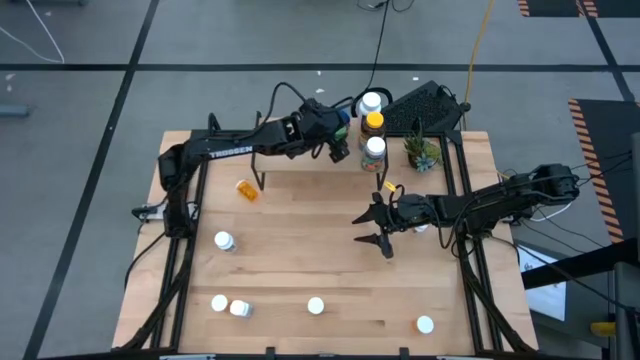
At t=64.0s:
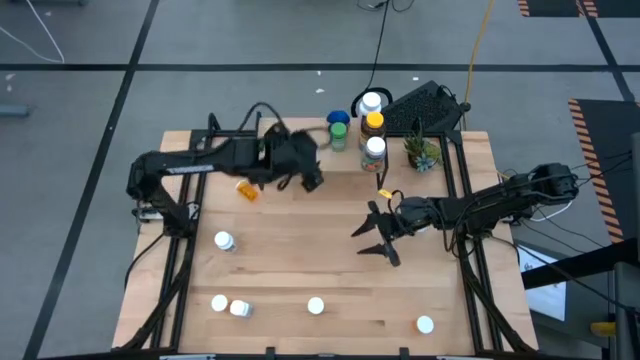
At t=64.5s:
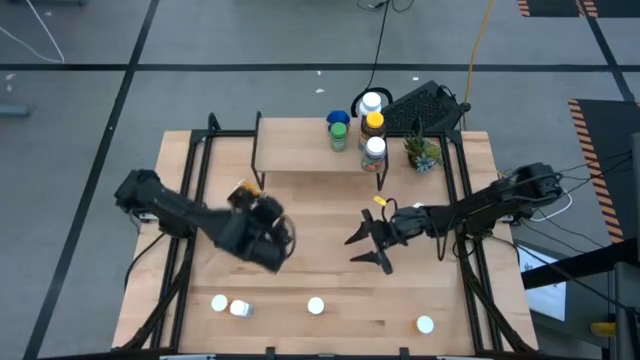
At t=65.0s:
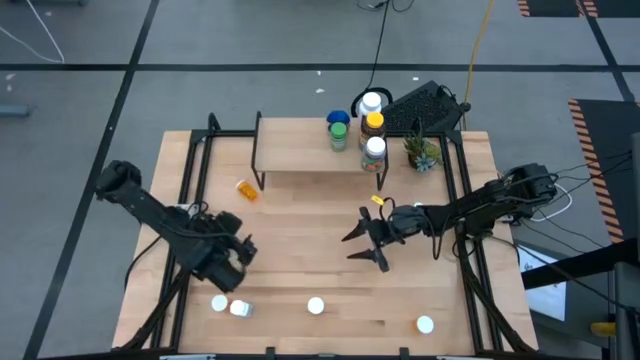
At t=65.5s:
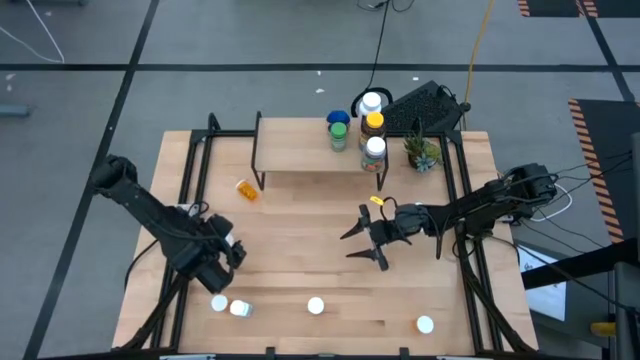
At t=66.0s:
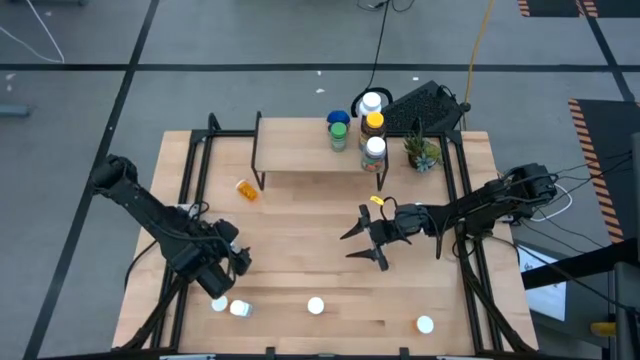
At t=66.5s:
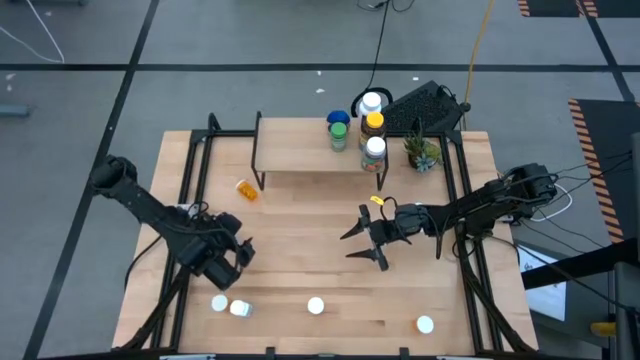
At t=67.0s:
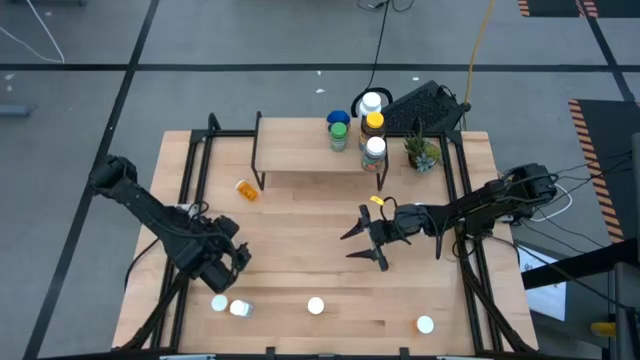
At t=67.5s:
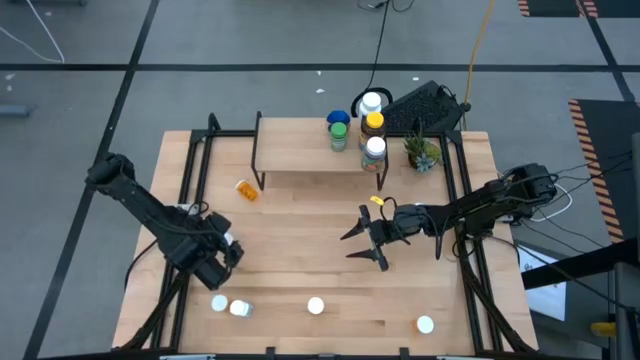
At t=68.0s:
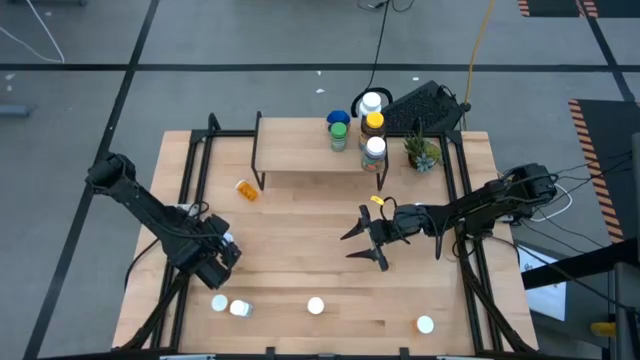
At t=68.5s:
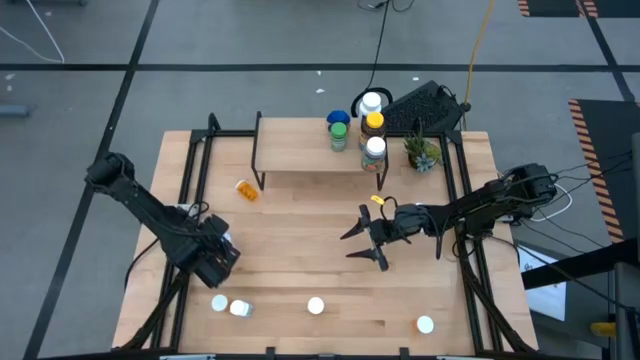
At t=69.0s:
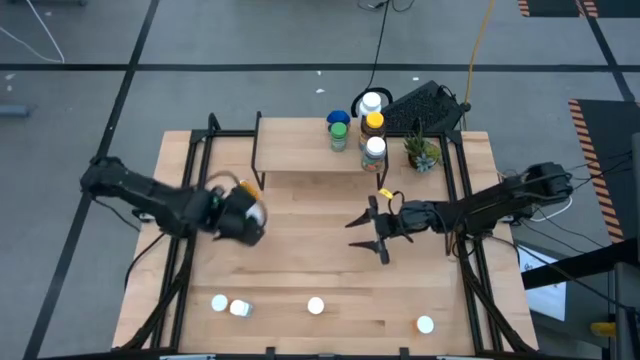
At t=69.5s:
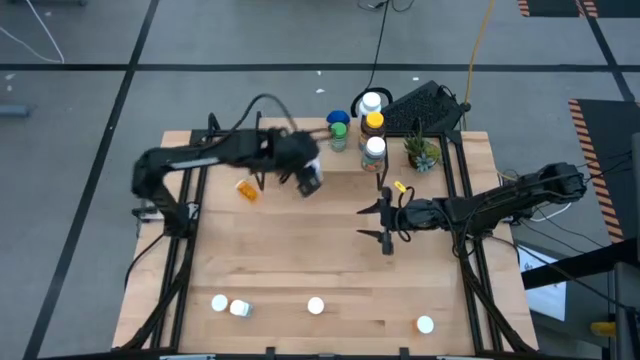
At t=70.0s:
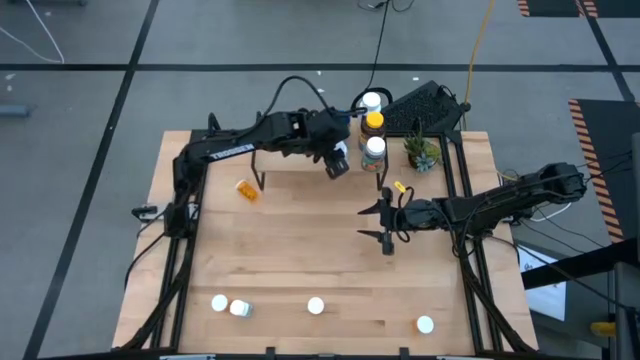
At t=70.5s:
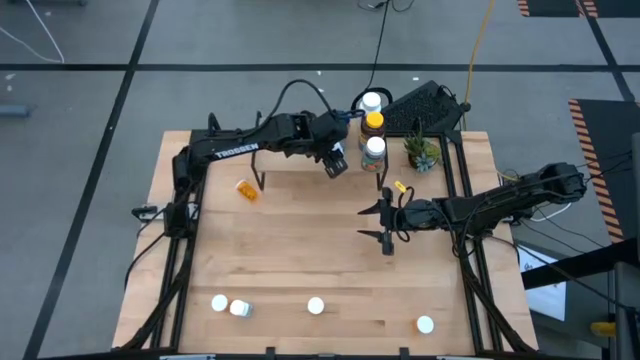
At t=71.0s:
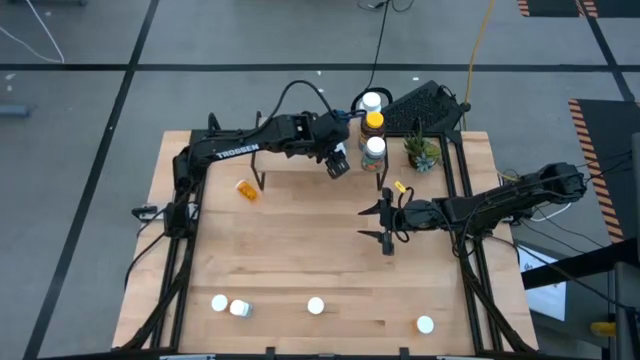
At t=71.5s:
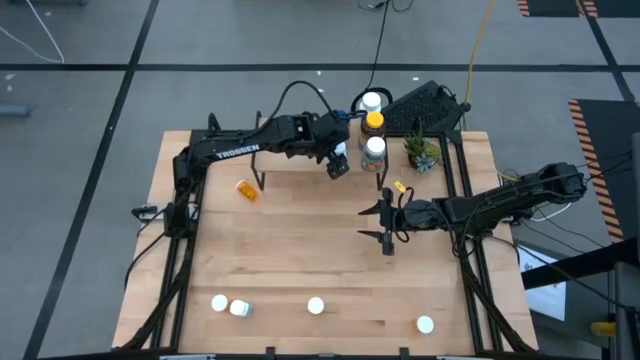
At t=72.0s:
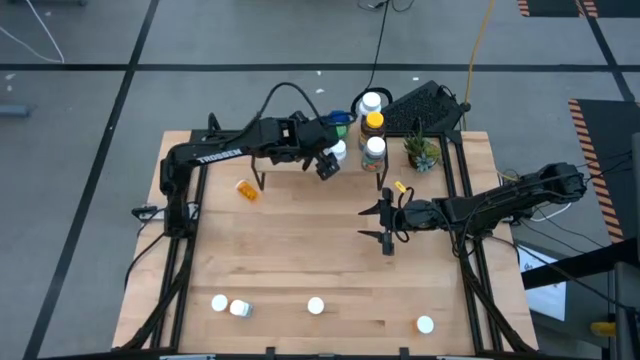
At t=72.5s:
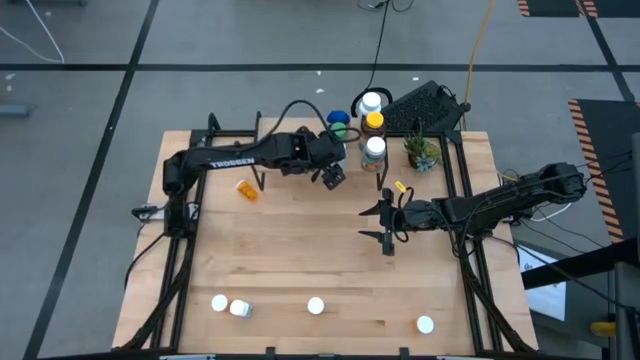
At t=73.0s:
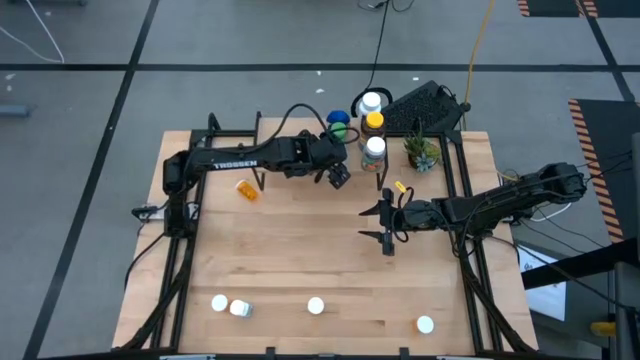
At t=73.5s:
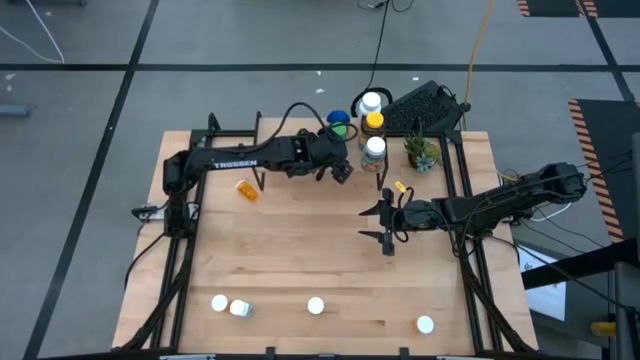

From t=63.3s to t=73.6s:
Task: Pick and place medicine bottles onto shelf by color
Put the white pill bottle on the shelf

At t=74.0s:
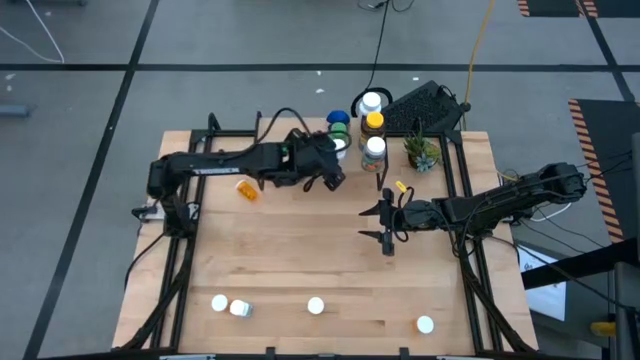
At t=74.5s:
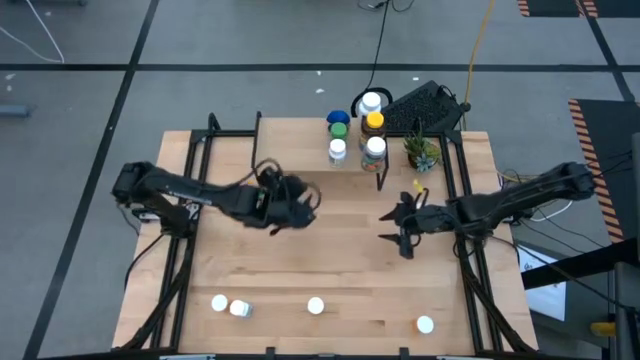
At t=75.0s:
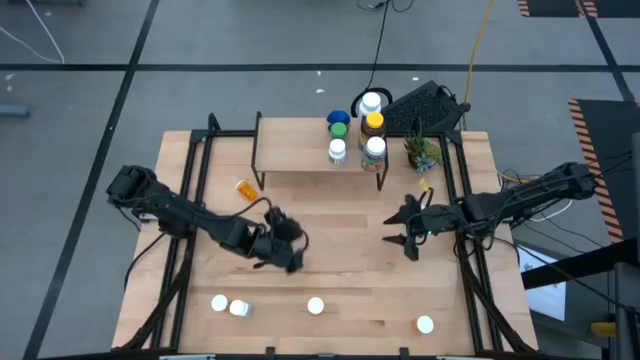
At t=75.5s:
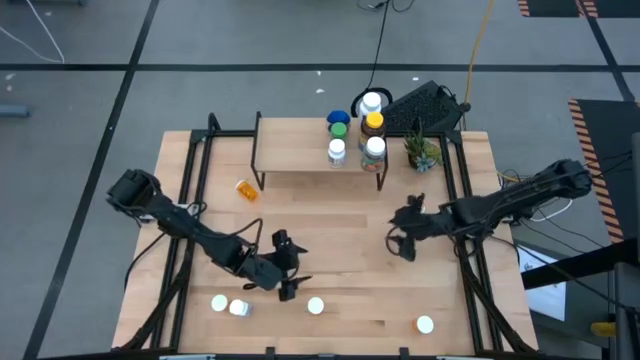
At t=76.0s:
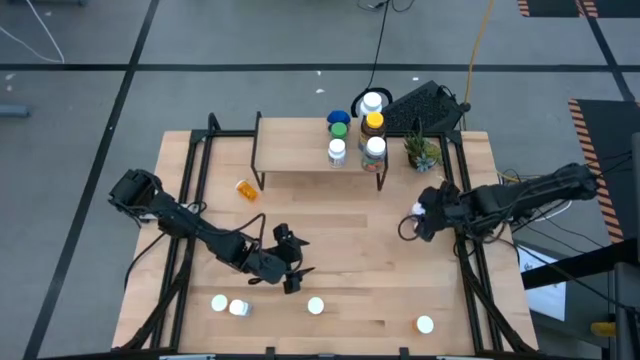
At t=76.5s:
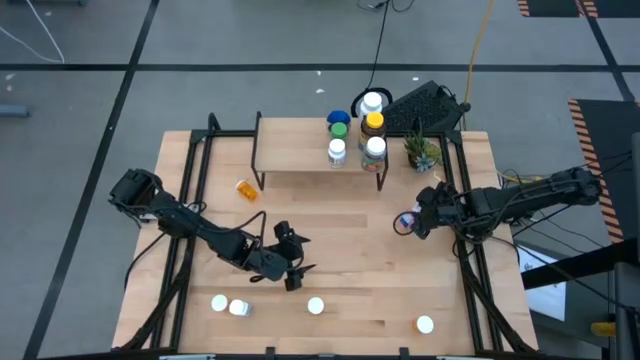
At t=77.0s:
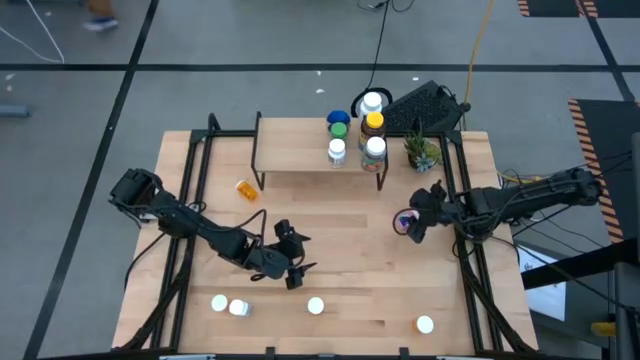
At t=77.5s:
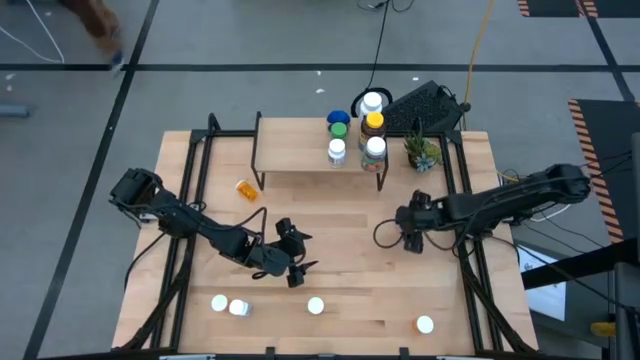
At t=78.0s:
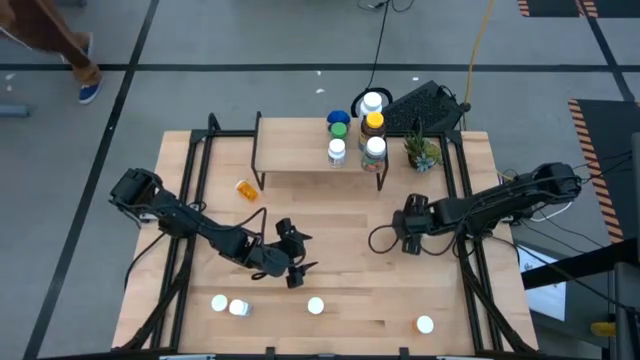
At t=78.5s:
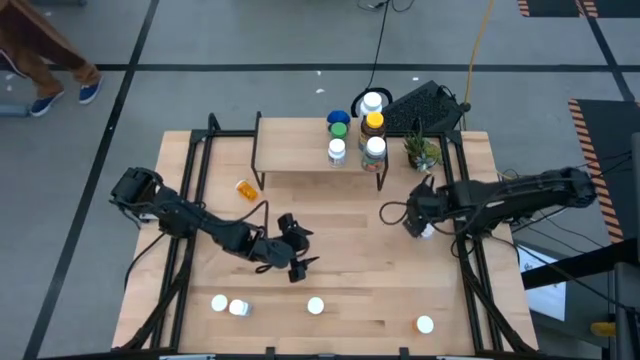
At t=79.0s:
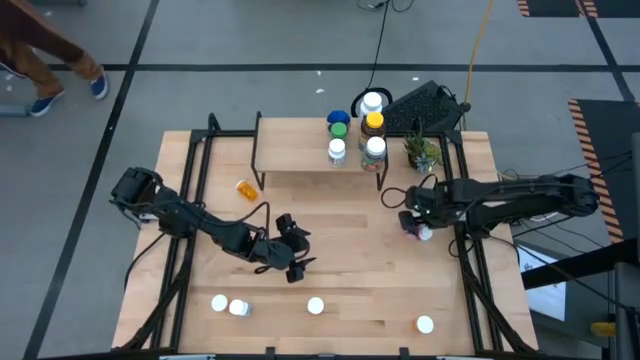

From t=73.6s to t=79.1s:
Put the pink pill bottle on the shelf

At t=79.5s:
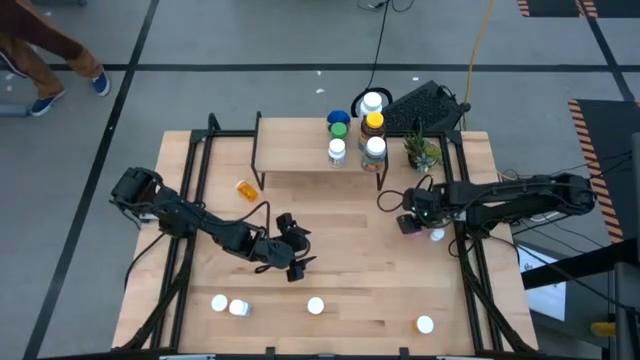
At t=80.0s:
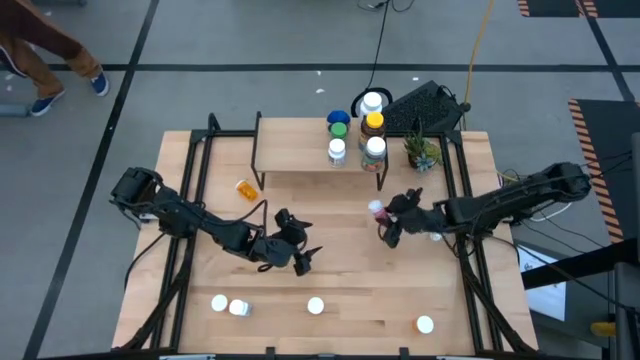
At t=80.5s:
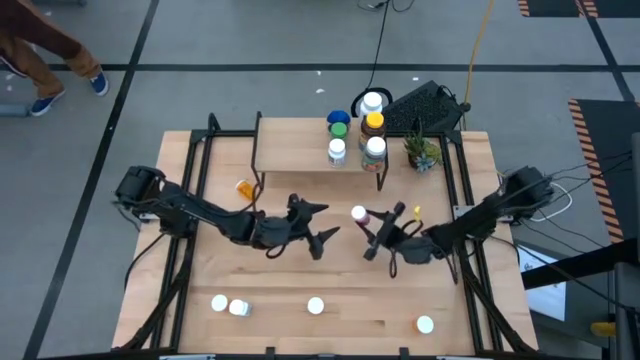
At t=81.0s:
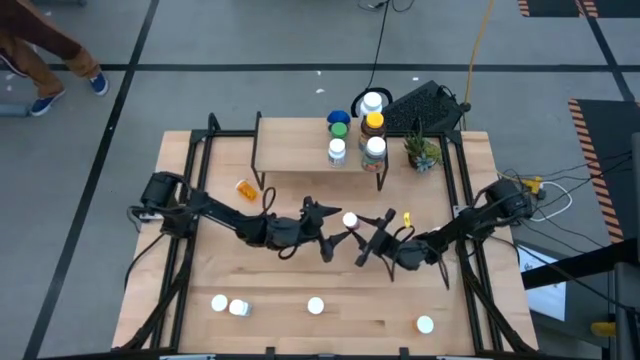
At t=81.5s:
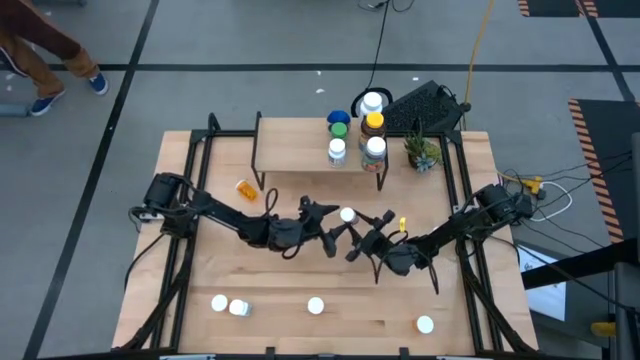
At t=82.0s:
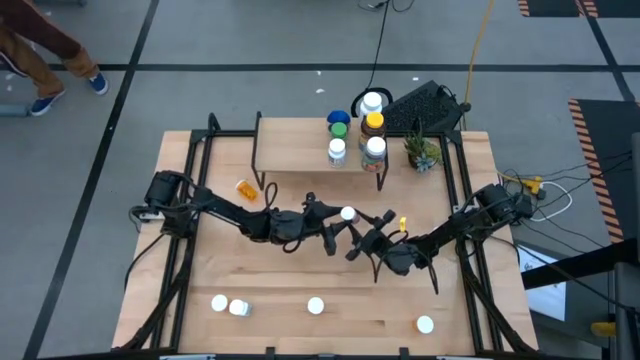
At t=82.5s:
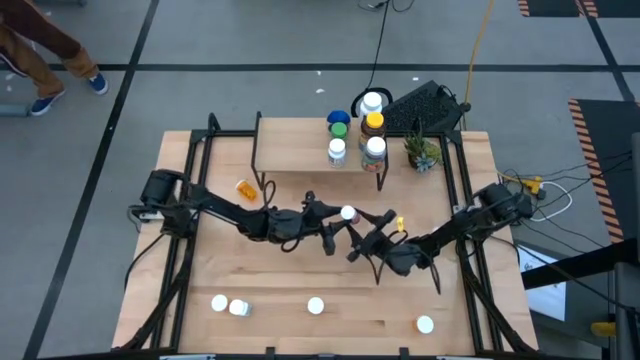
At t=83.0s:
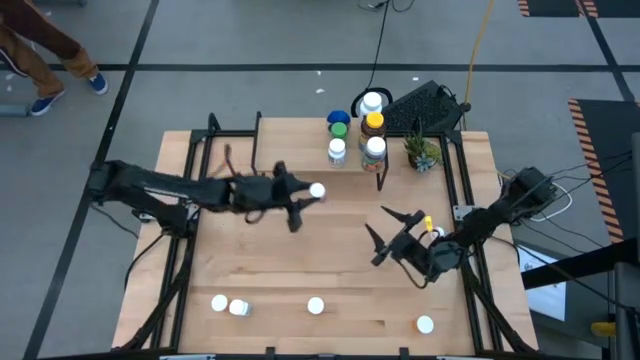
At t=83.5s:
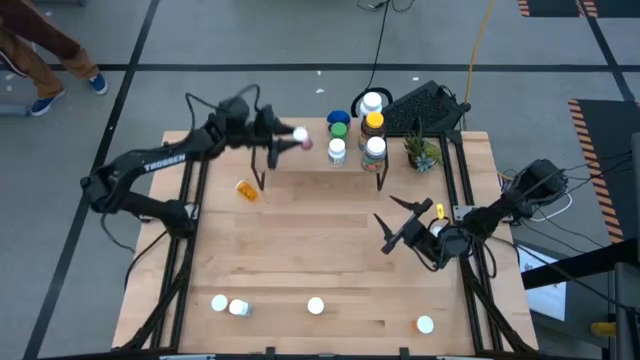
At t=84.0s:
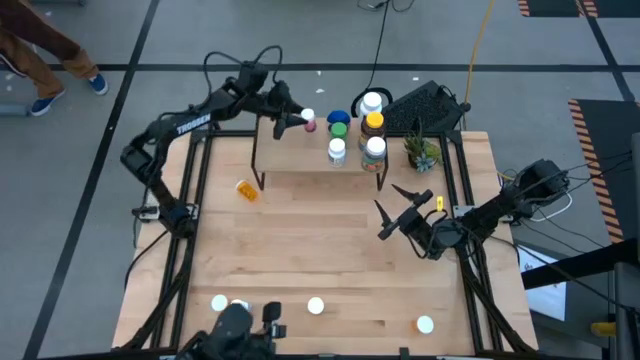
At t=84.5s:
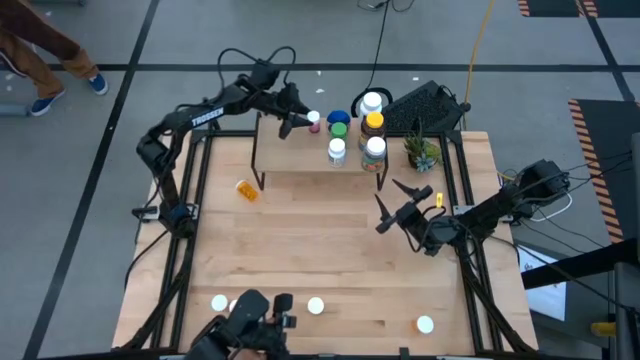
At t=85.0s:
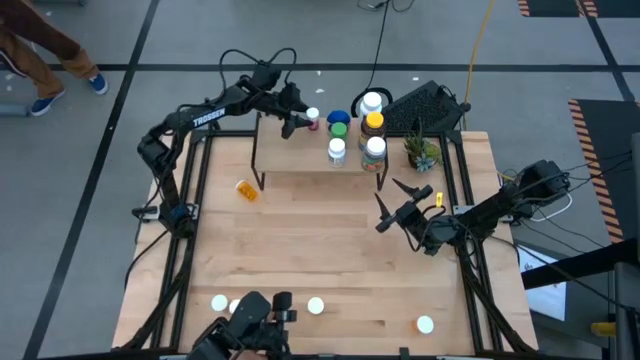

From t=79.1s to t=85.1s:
Put the pink pill bottle on the shelf
